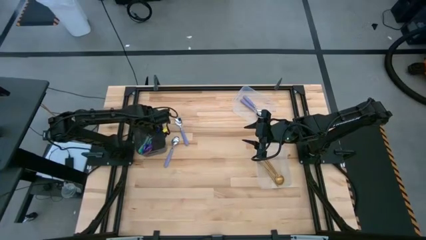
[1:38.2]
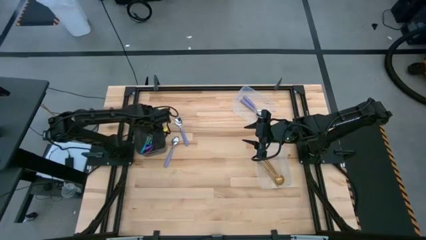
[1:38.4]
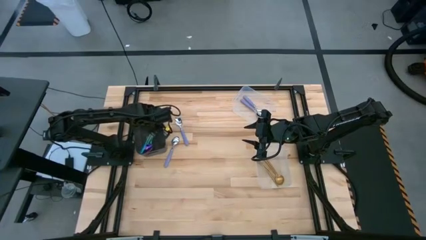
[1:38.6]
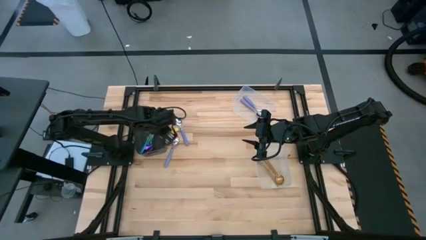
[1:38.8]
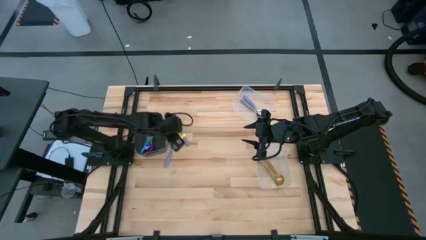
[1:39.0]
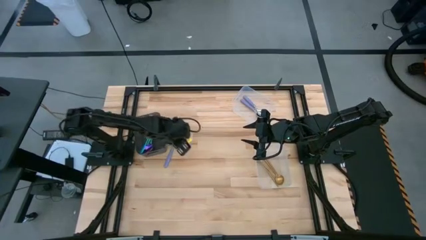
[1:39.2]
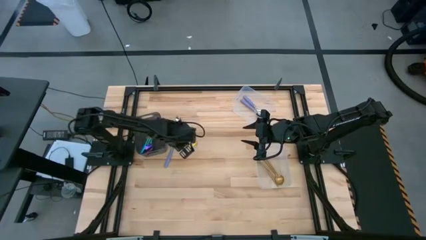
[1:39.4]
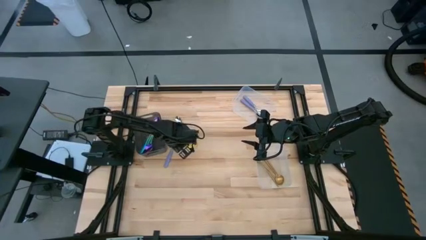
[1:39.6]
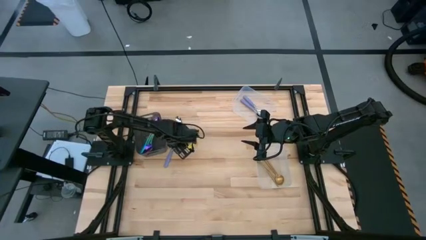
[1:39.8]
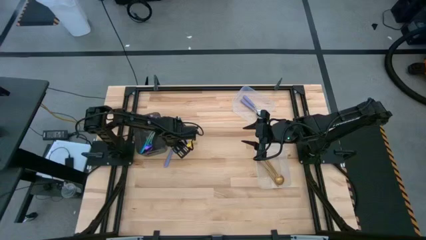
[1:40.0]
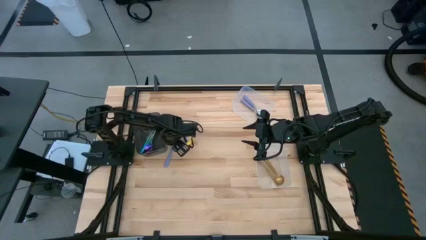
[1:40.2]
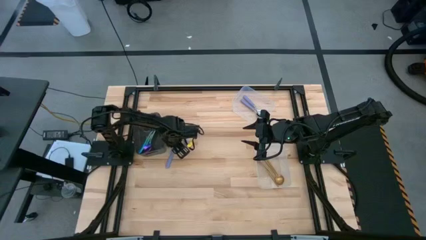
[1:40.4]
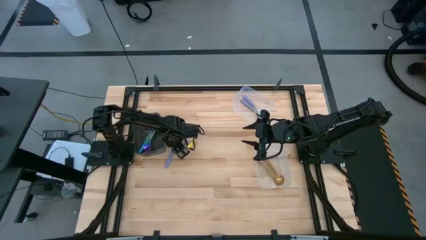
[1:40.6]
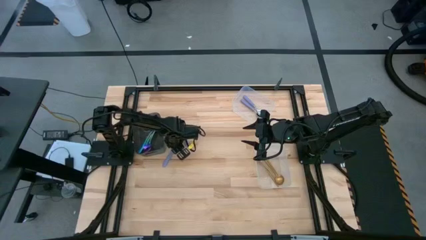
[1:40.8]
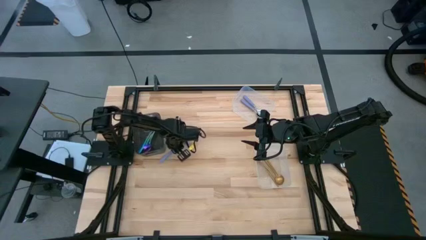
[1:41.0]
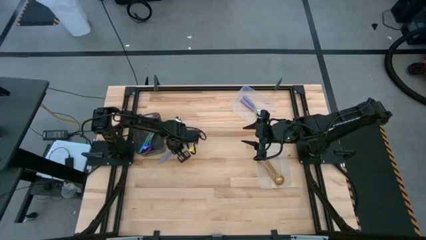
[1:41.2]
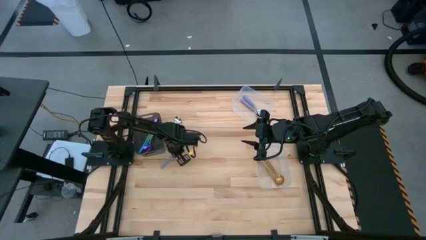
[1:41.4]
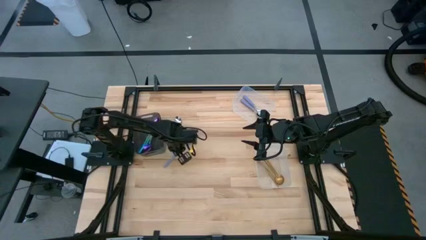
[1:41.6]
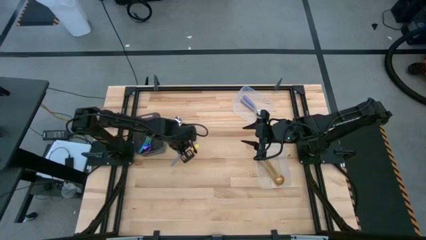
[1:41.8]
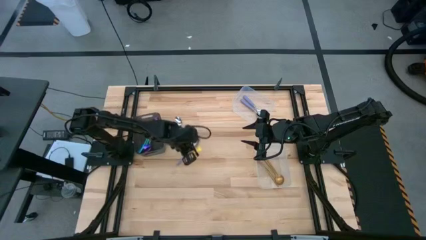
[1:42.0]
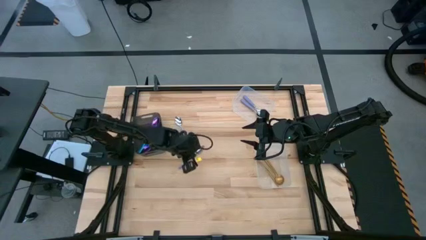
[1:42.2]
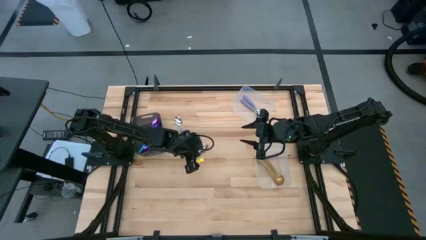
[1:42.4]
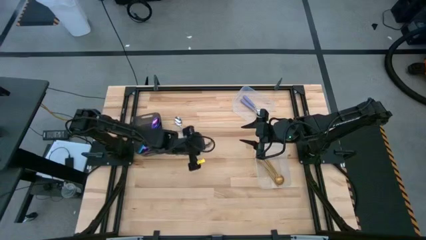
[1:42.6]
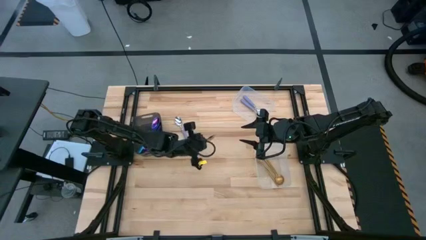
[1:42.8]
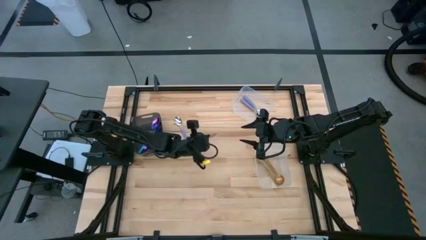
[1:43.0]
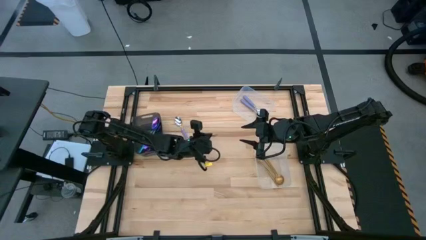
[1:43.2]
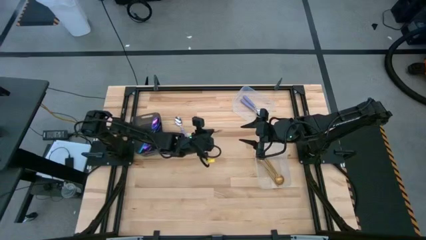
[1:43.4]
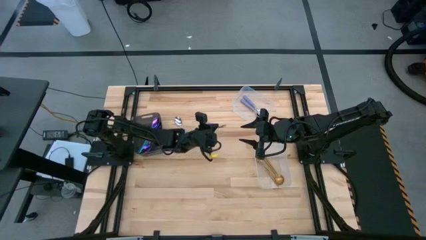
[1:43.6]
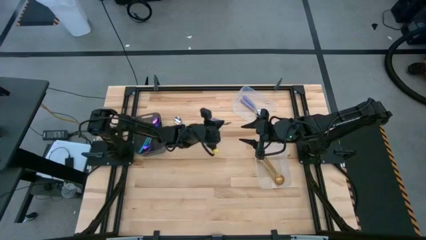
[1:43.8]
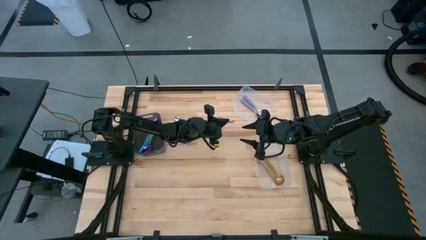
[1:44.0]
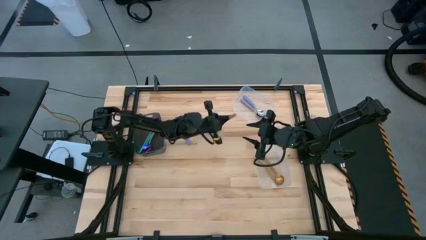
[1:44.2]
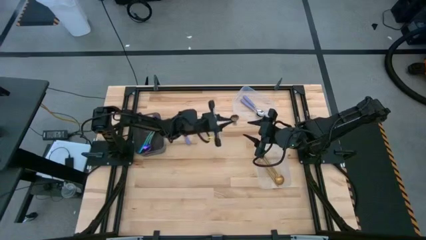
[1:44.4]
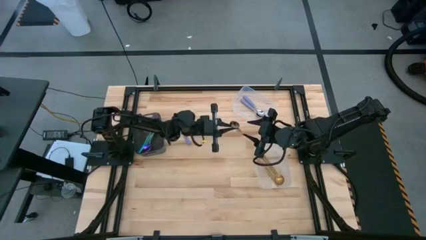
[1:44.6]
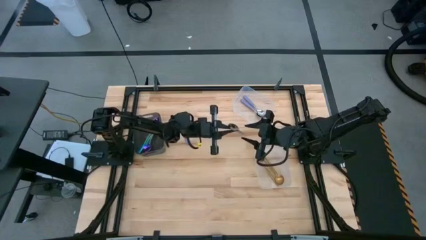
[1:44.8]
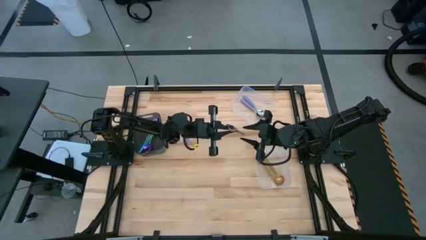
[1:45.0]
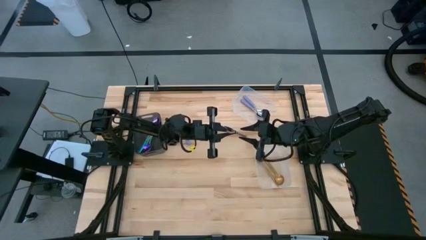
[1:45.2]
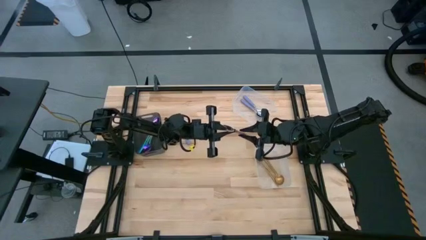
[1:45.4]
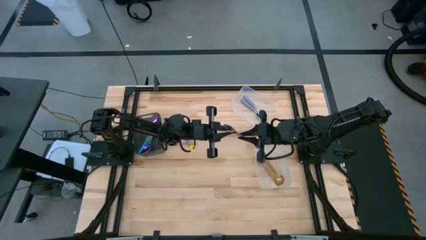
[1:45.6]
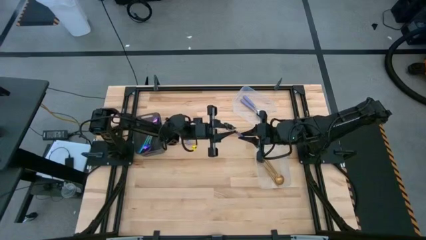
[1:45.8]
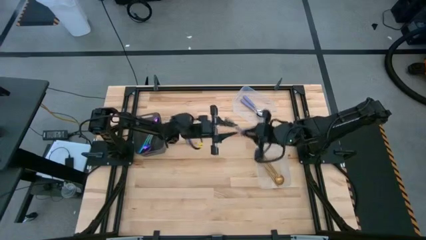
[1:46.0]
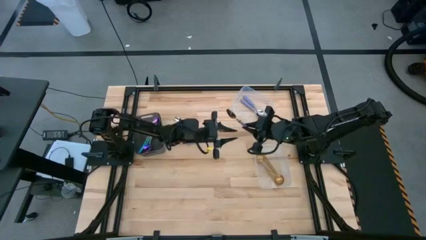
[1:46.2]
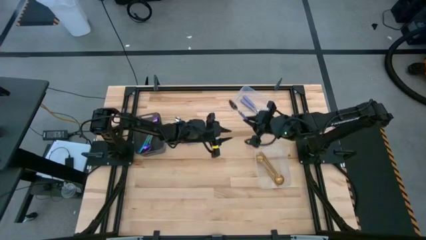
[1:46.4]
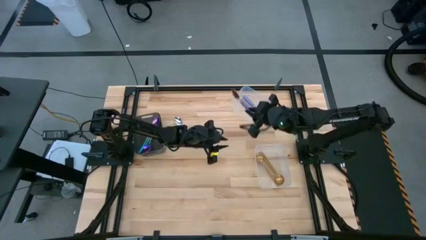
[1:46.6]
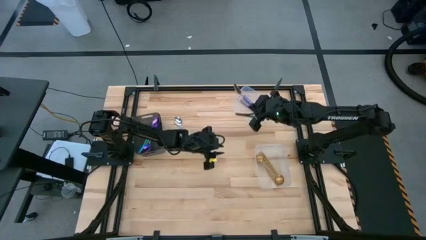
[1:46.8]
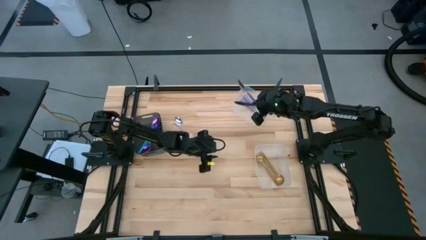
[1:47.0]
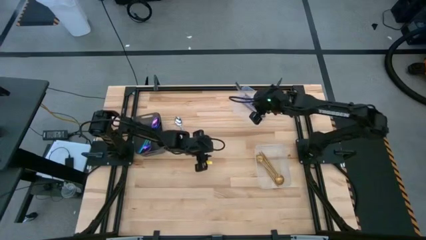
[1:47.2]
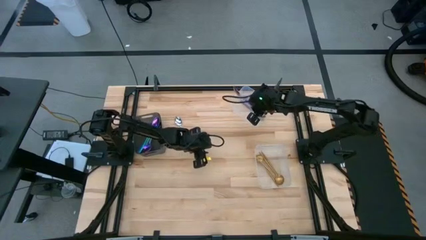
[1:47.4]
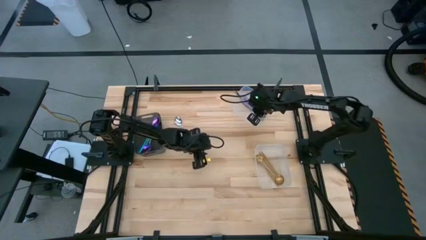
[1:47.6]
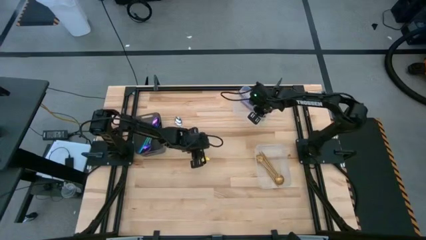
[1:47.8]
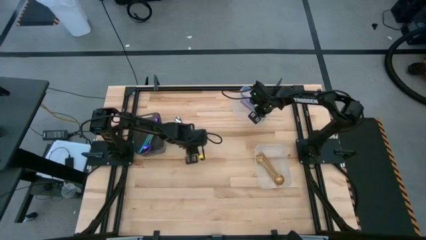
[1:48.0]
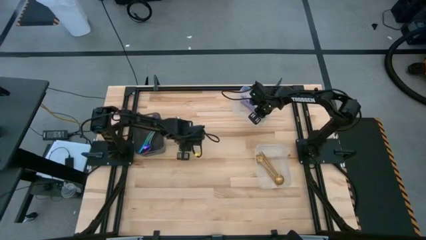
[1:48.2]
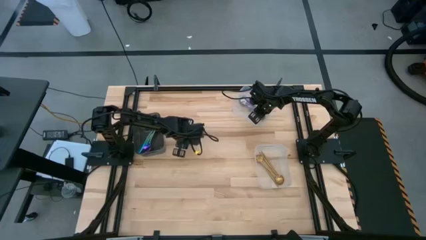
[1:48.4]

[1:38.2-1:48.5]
Task: Sort silverware by color (type)
Put the purple spoon into the top transparent bin
